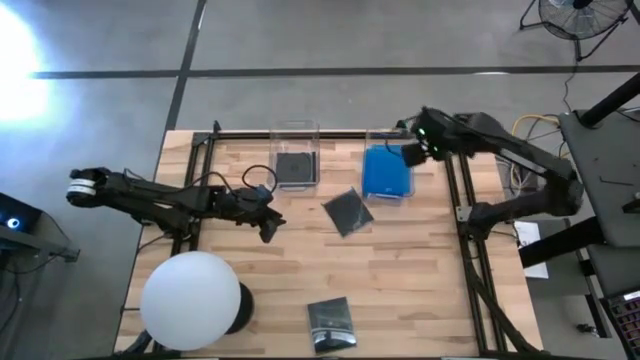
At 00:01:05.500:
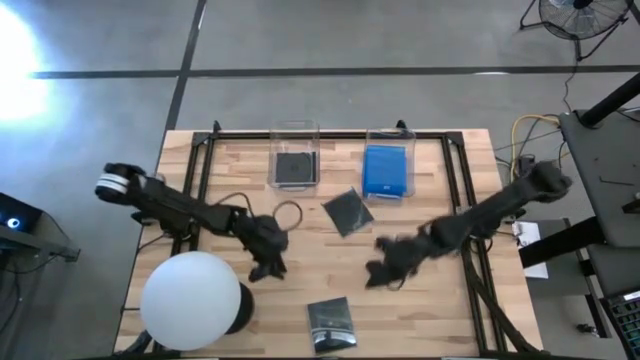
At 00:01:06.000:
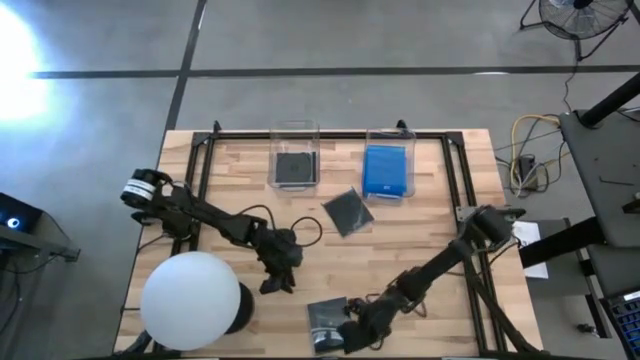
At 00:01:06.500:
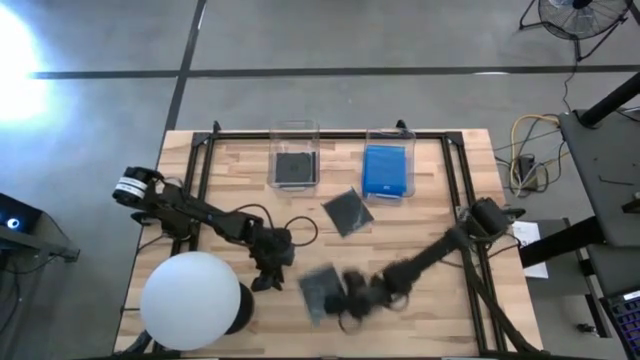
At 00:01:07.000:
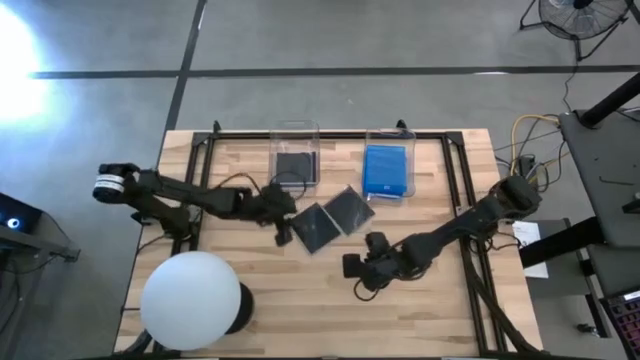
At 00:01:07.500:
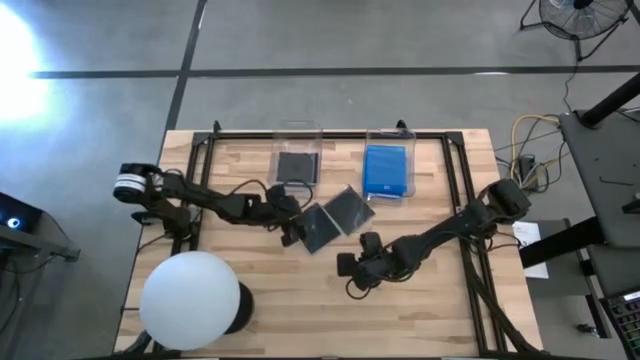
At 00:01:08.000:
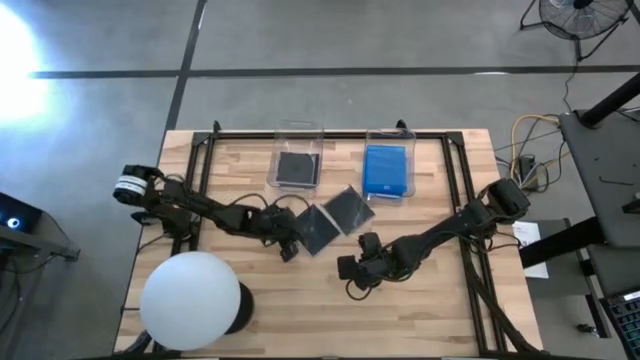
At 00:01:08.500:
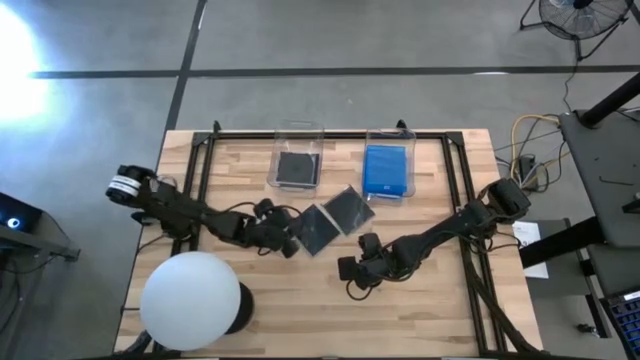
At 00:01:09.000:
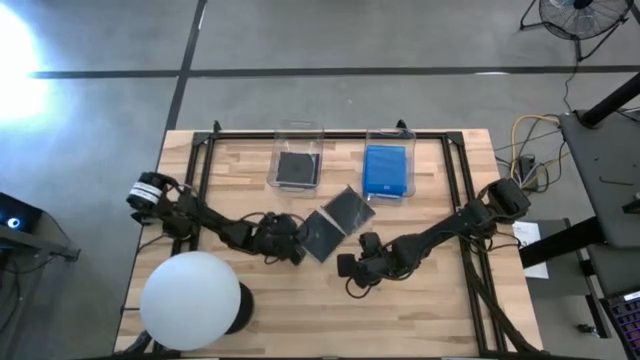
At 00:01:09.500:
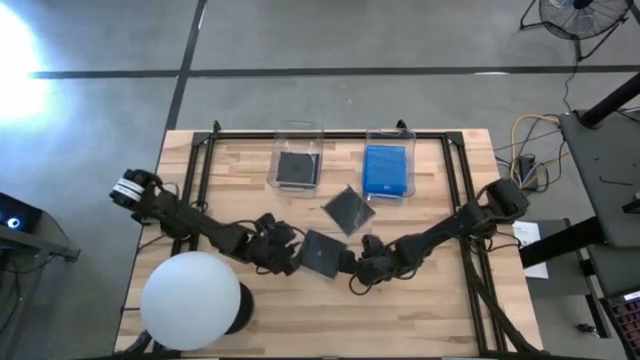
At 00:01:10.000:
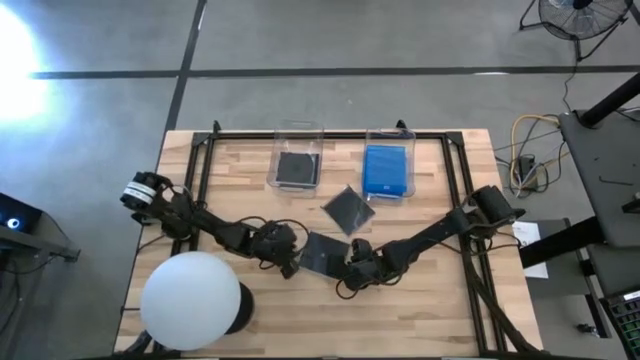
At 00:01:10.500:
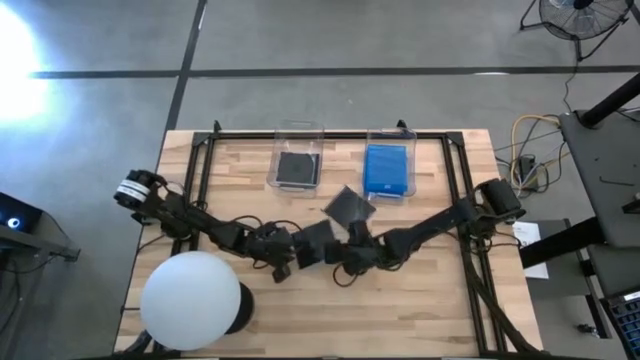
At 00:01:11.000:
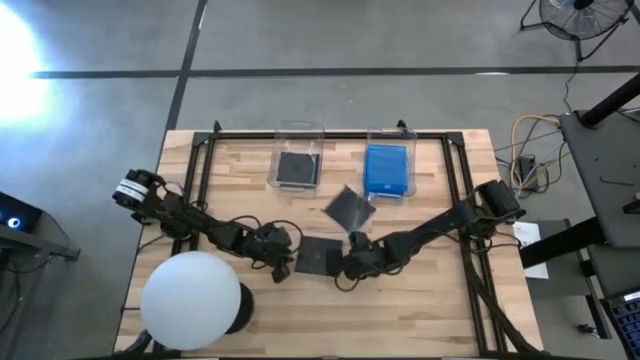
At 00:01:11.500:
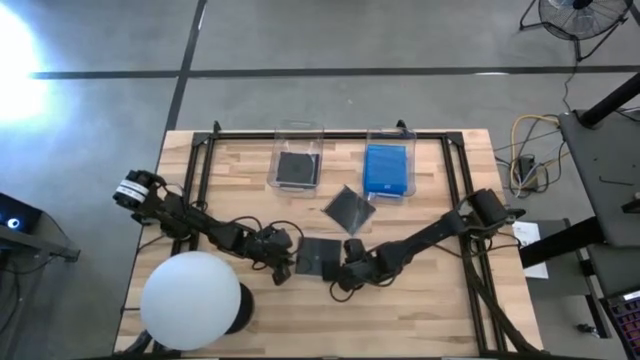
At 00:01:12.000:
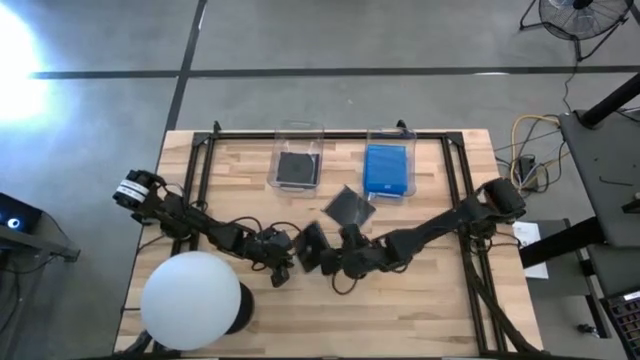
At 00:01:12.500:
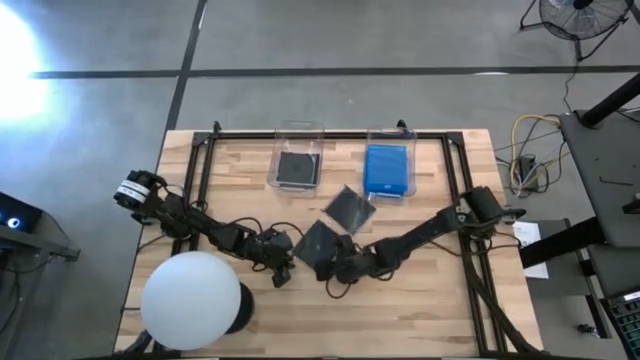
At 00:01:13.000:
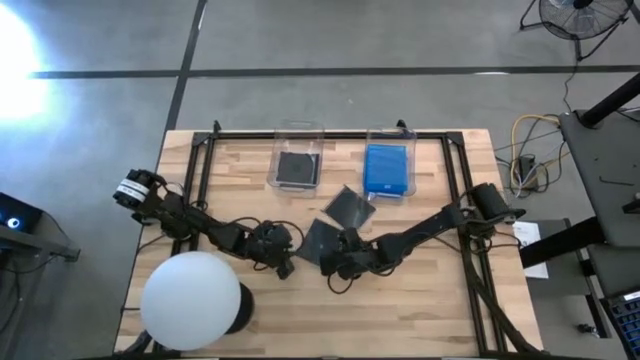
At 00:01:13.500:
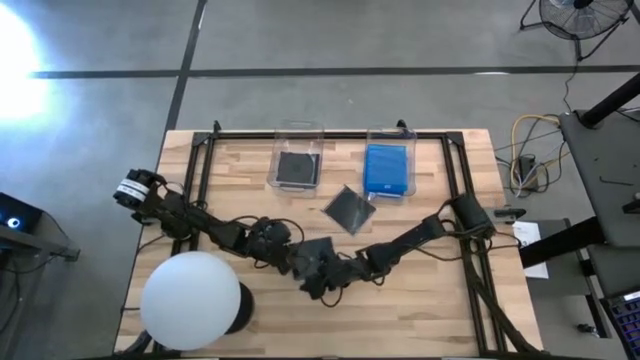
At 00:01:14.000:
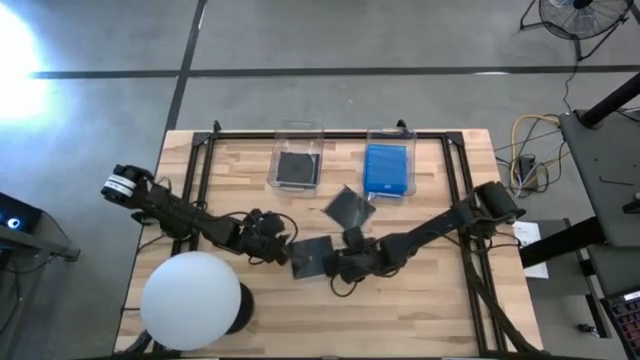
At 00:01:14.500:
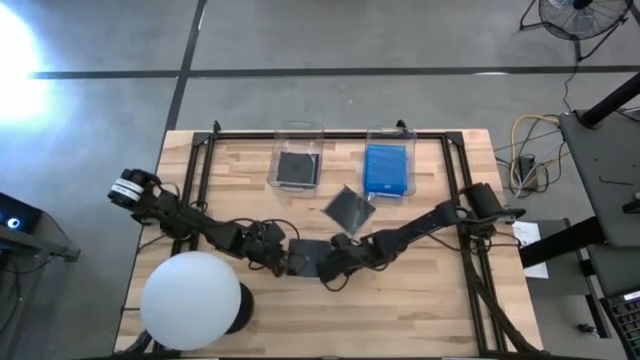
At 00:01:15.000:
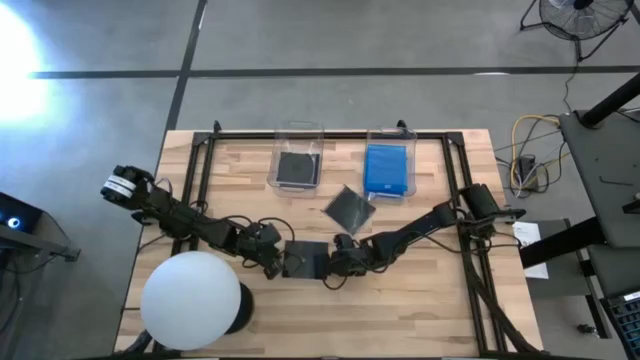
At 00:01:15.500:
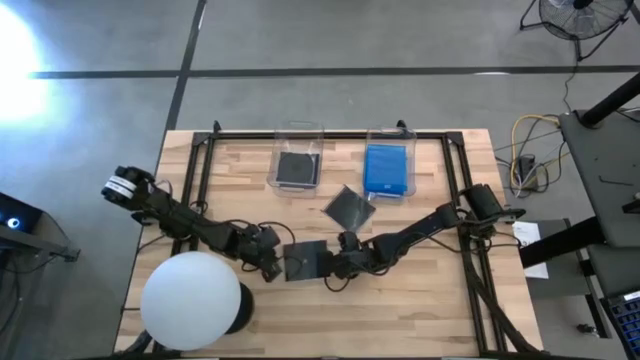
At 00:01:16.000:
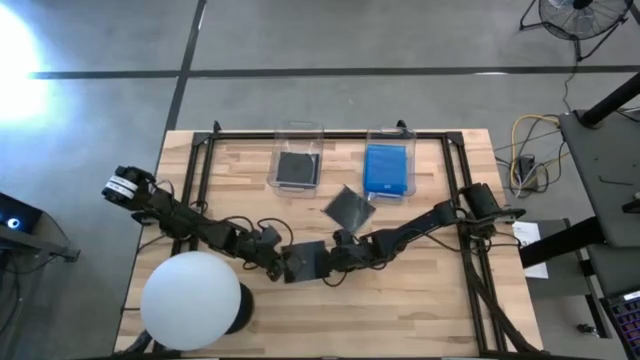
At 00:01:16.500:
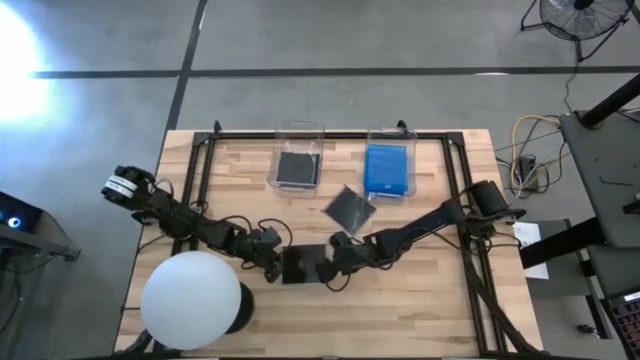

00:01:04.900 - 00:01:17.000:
Task: Pick & place jewel cases by type
Put the black cd case into the left transparent bin

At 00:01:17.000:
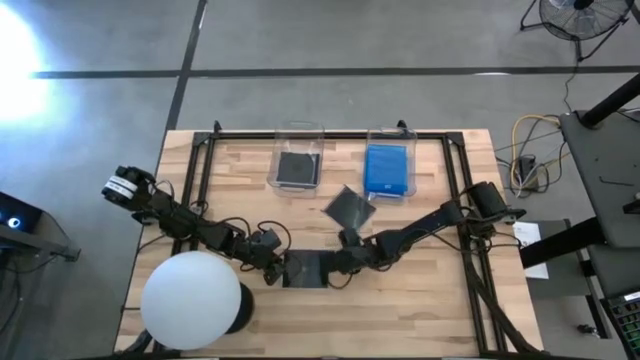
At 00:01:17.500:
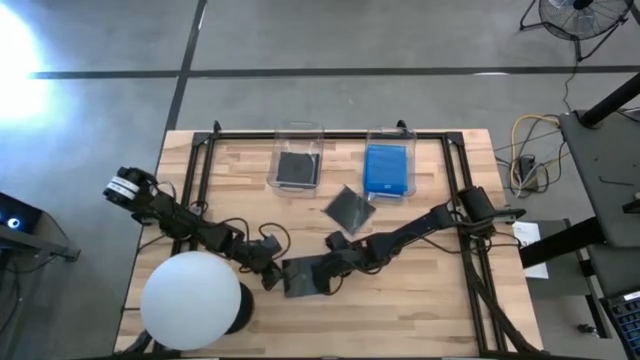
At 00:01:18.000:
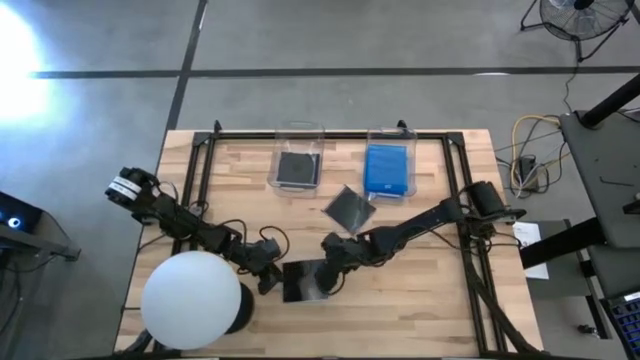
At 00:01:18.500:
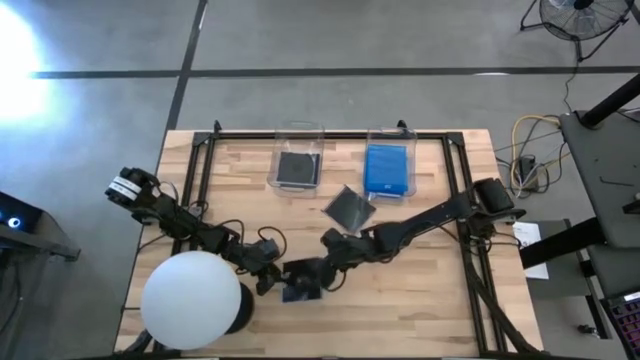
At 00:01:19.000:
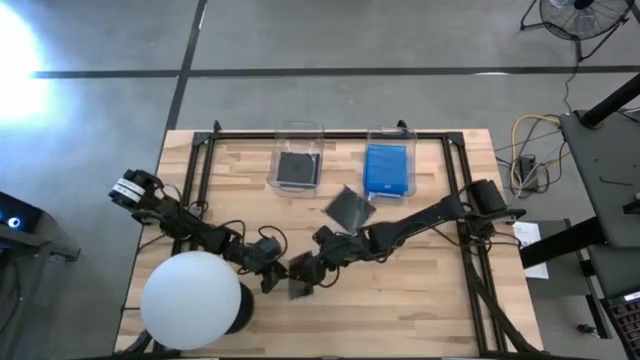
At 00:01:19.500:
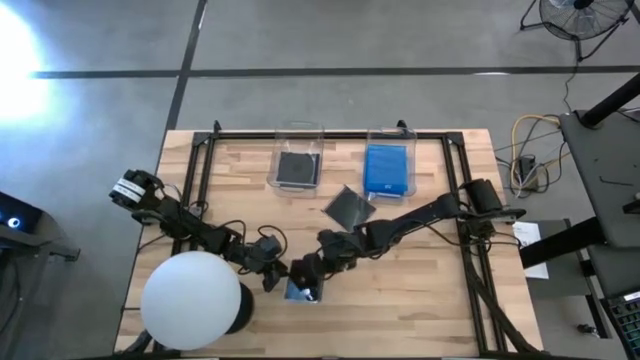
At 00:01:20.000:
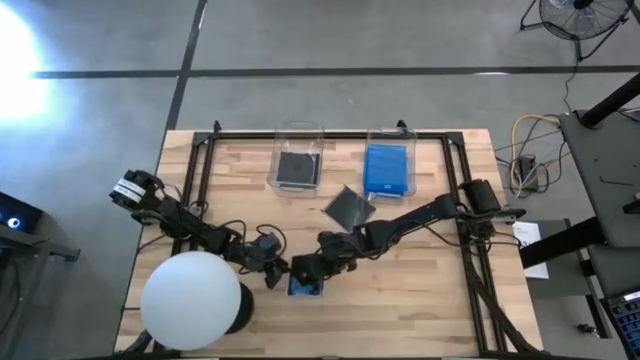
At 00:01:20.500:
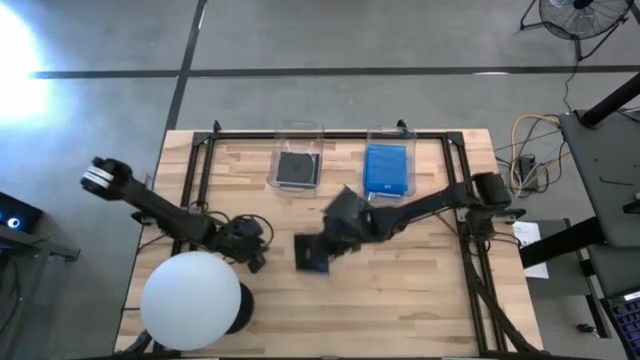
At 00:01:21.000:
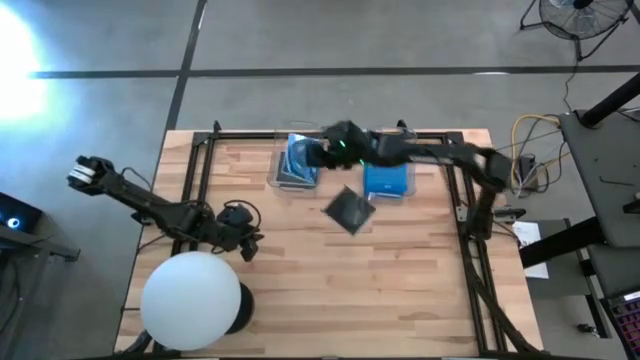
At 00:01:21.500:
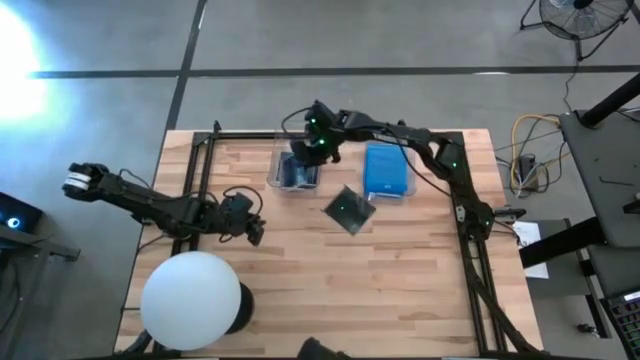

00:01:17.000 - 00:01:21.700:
Put the black cd case into the left transparent bin

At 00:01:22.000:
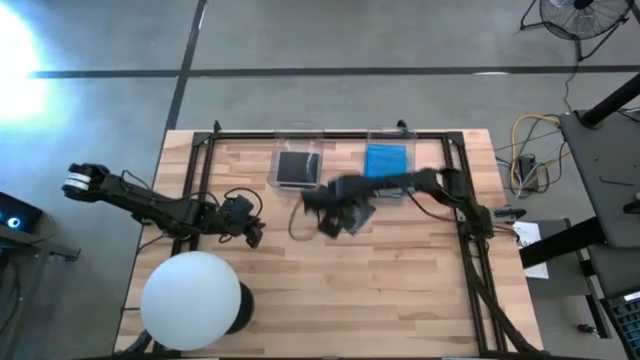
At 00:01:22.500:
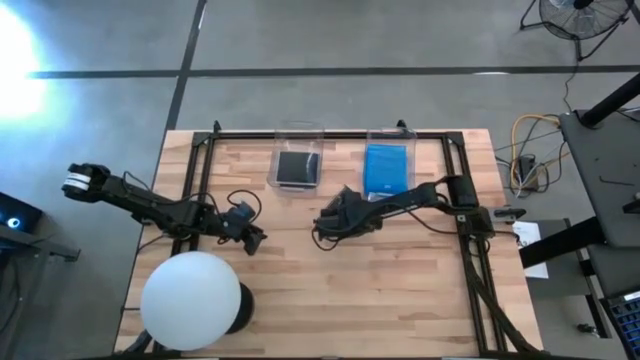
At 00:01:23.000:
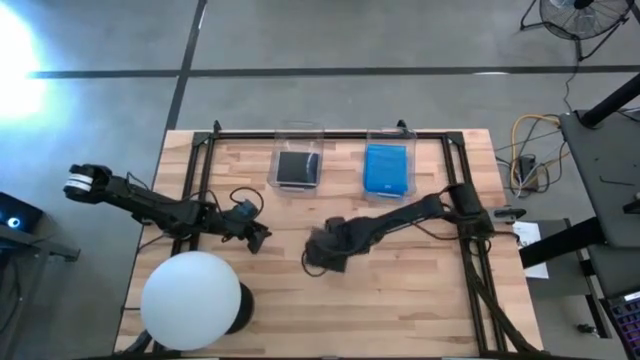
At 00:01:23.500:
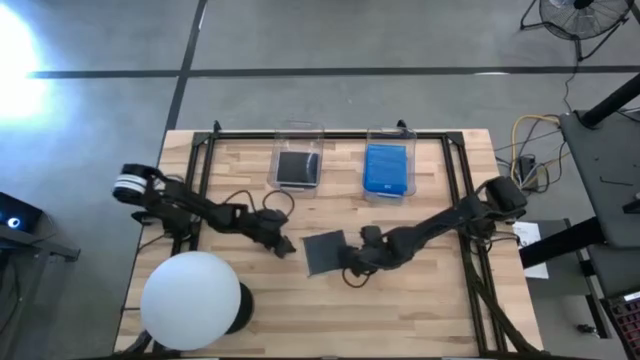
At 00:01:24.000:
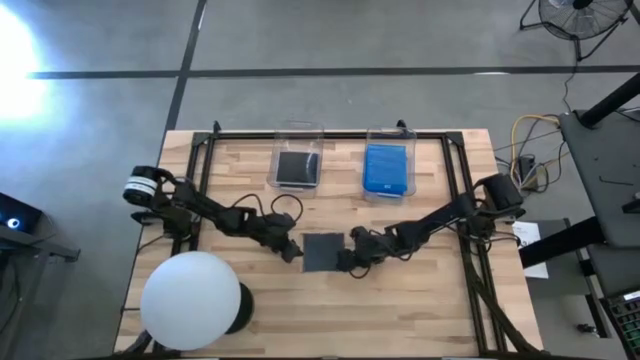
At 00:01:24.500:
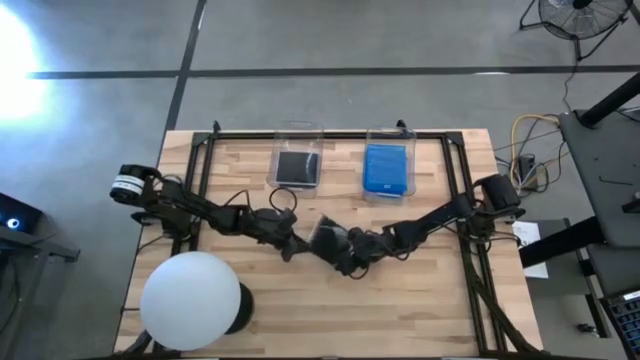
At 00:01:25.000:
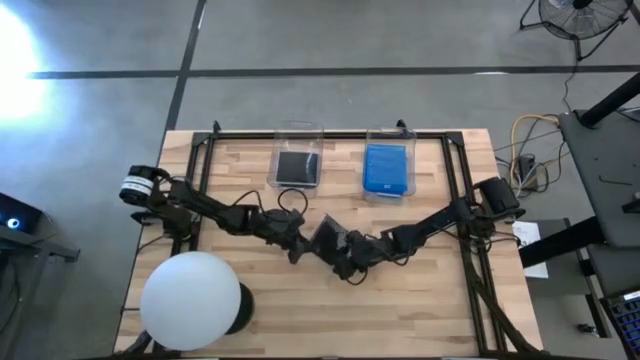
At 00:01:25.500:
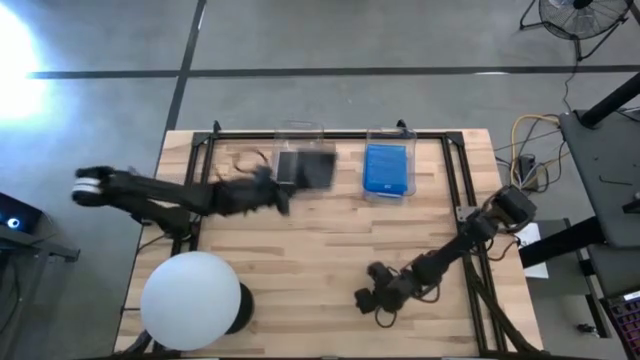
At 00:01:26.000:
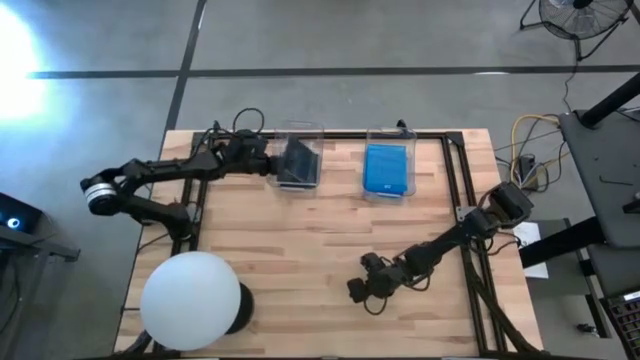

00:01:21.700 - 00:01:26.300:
Put the black cd case into the left transparent bin
